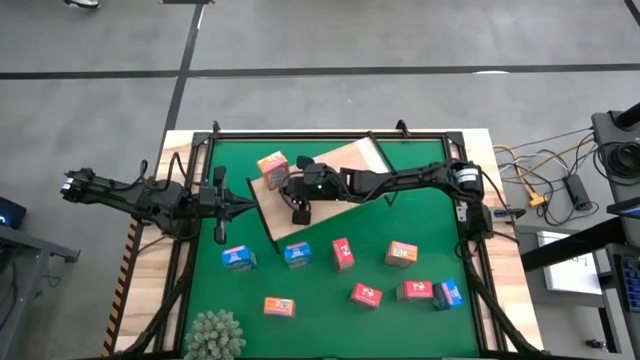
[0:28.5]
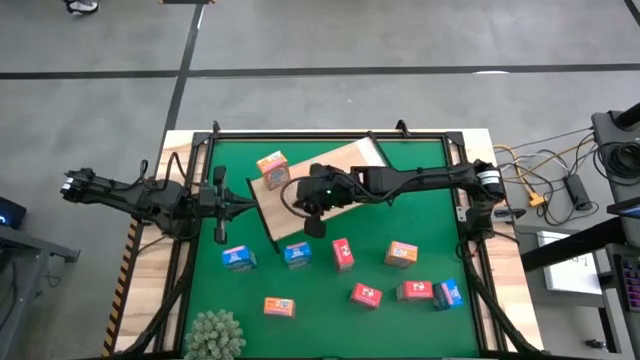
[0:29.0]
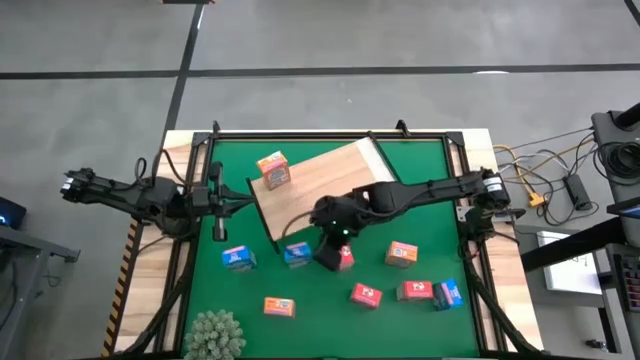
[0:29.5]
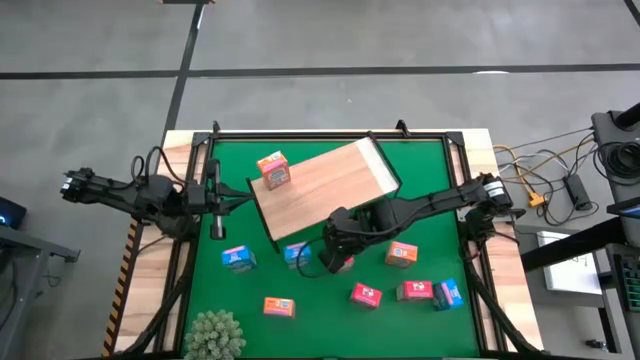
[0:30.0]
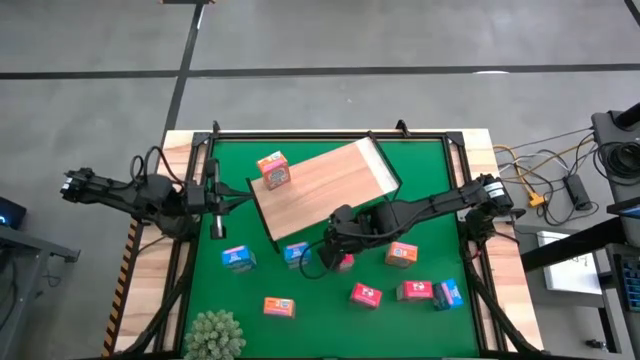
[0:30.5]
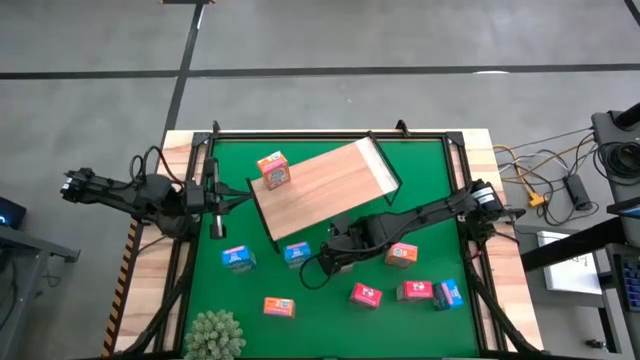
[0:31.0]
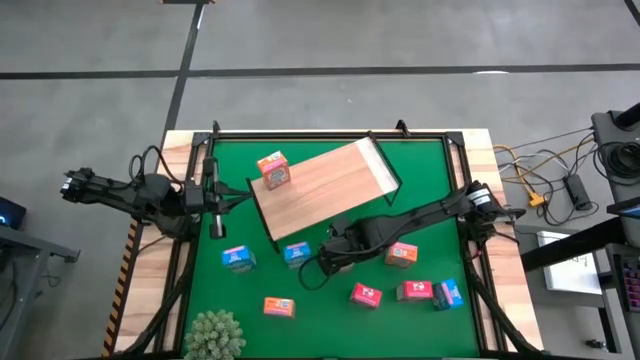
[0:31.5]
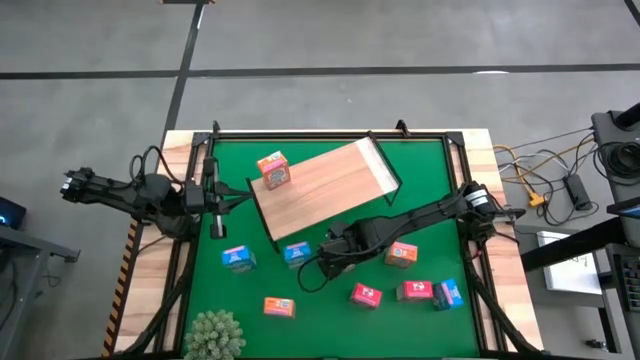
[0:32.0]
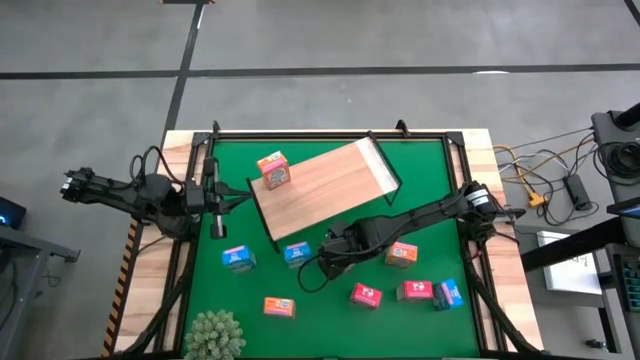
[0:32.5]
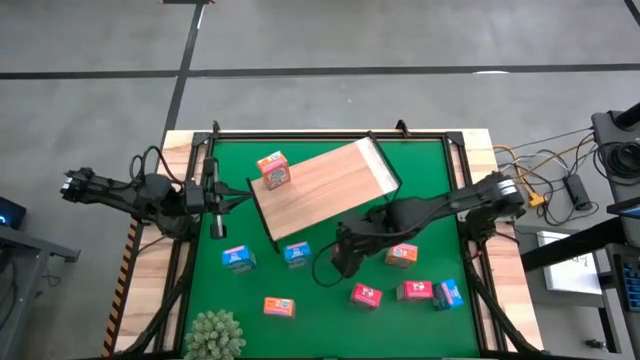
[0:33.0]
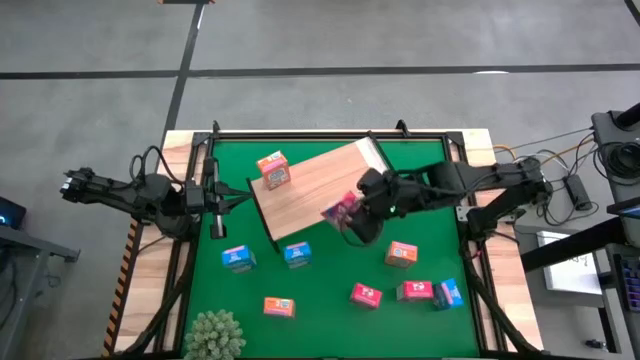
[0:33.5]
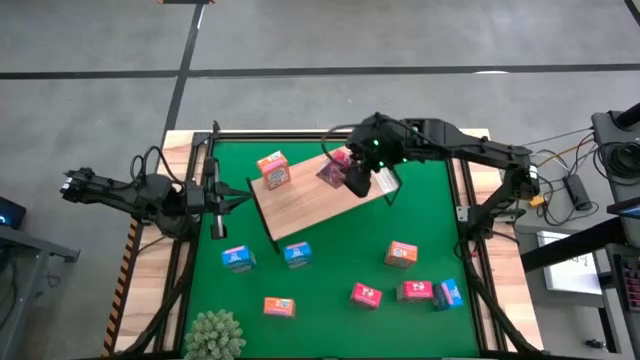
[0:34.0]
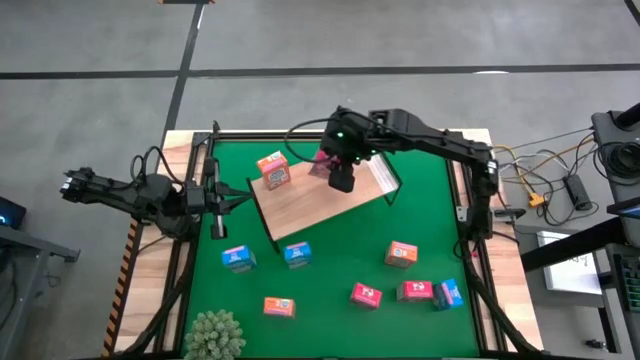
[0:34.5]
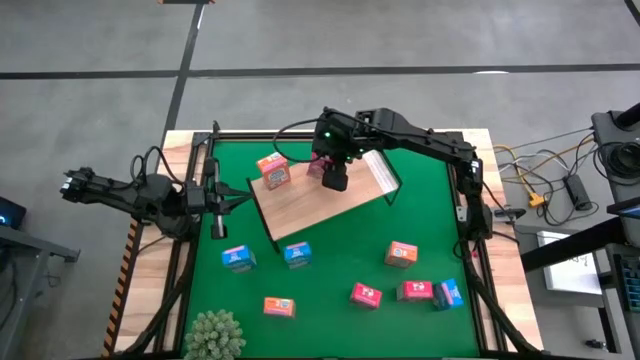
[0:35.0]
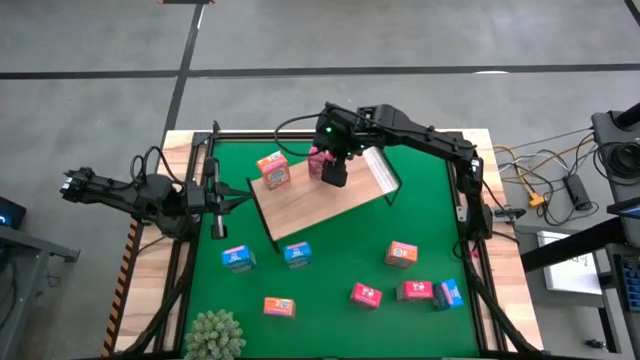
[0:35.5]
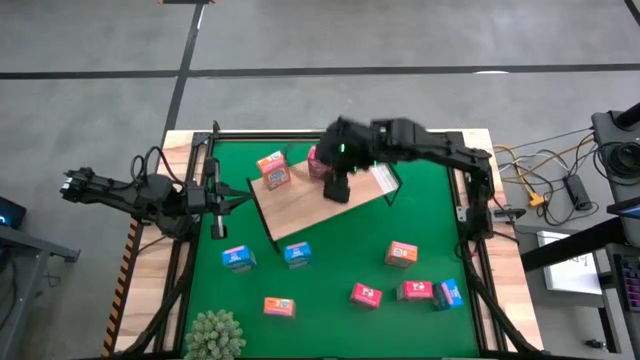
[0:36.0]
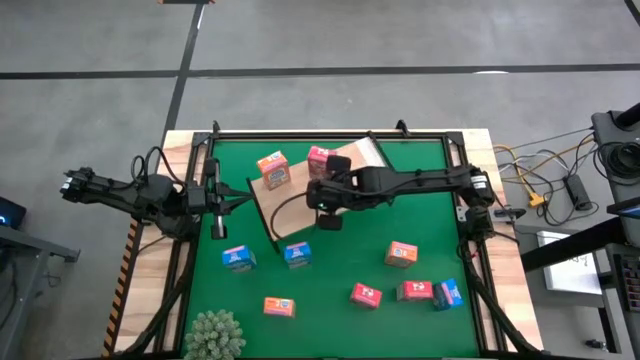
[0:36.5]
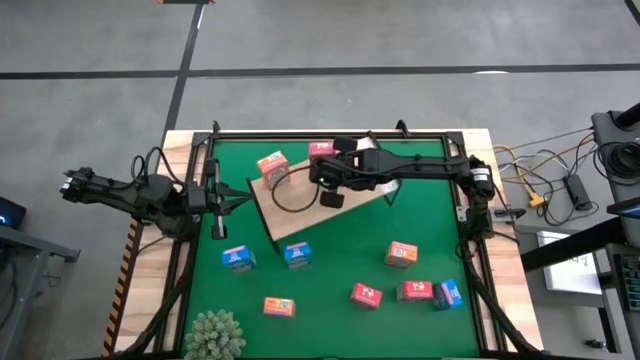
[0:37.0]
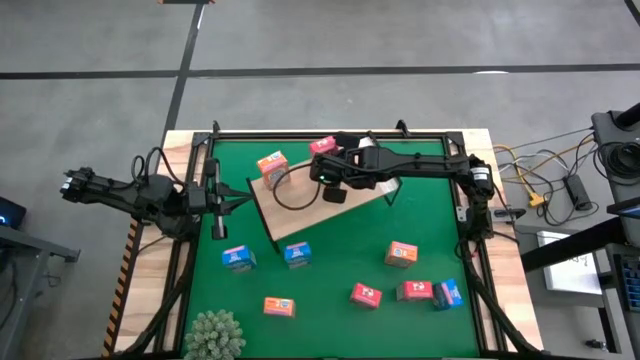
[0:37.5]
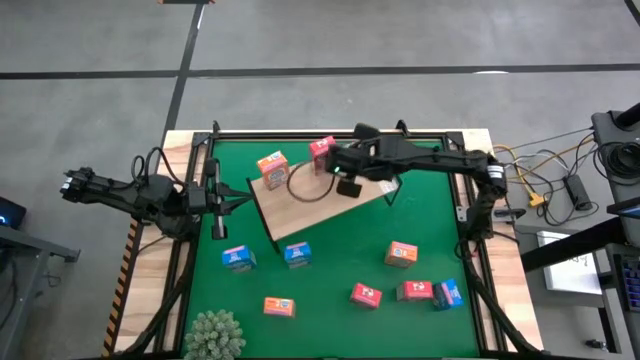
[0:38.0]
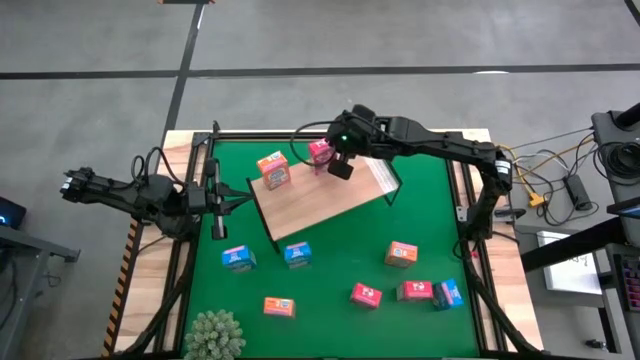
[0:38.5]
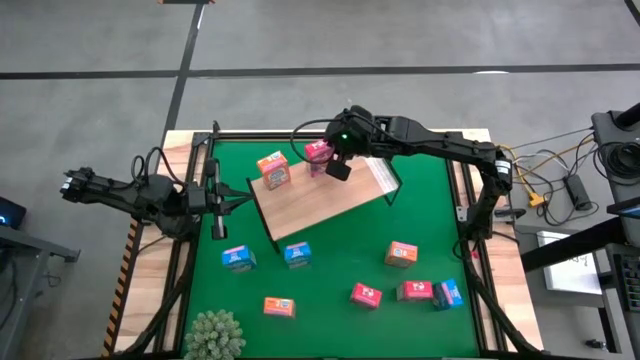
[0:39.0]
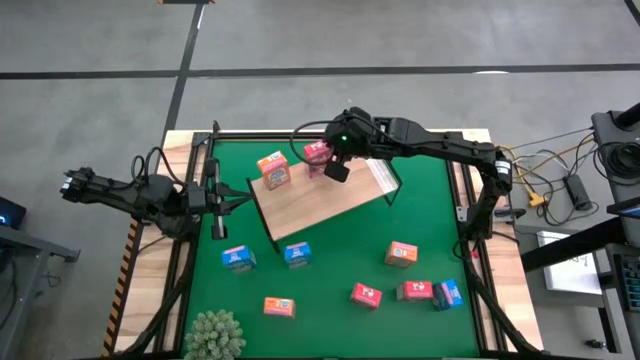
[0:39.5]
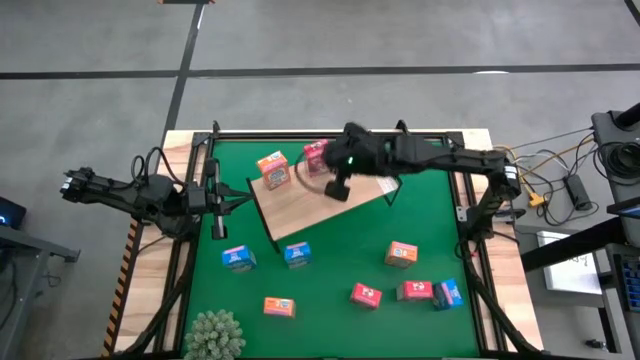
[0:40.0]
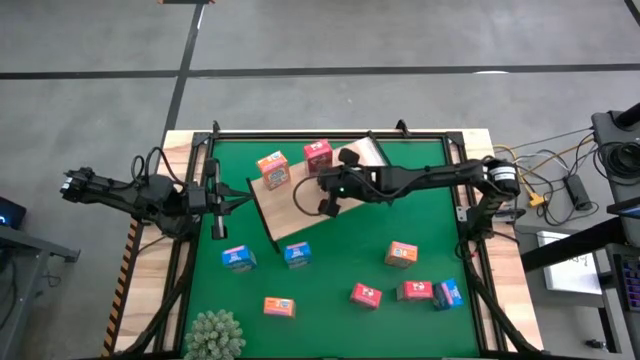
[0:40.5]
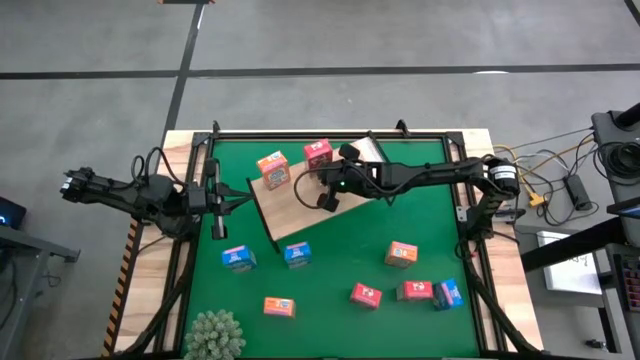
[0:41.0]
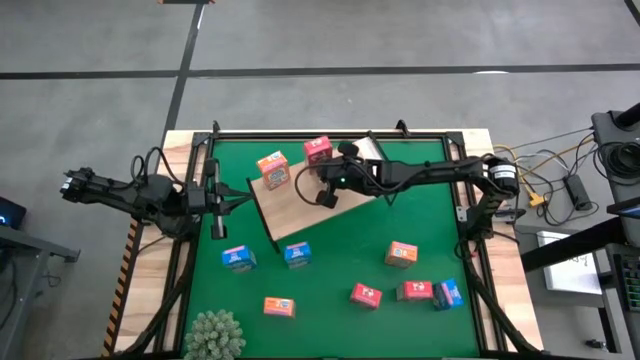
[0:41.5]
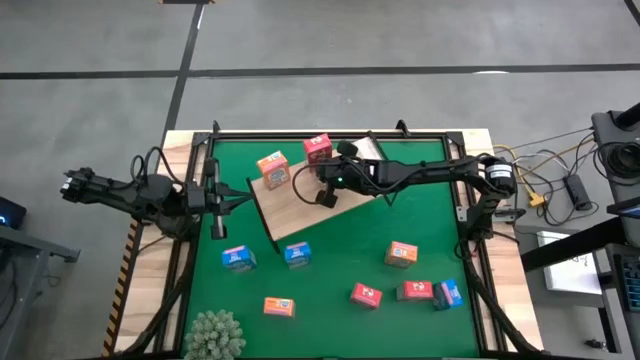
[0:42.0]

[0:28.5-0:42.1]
Task: Stack cereal on shelf
Put the top left red cereal box on the shelf

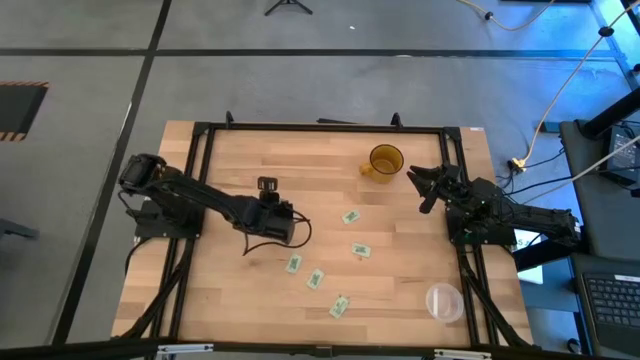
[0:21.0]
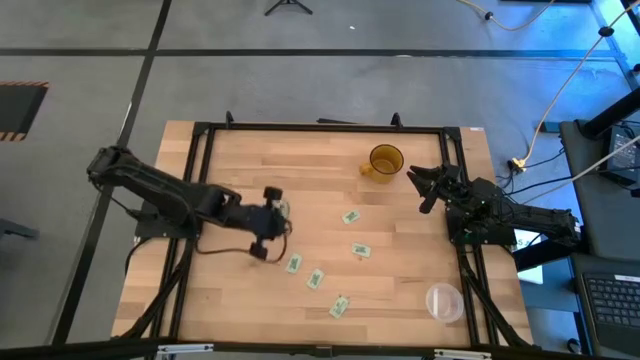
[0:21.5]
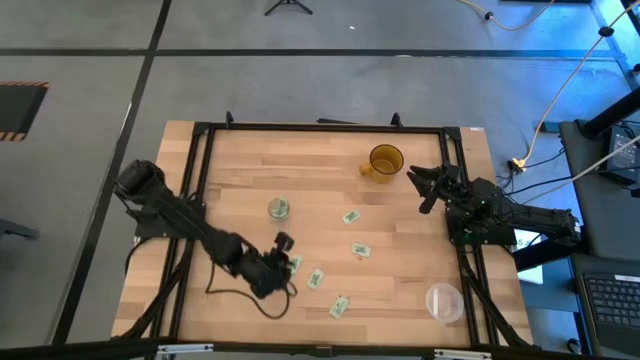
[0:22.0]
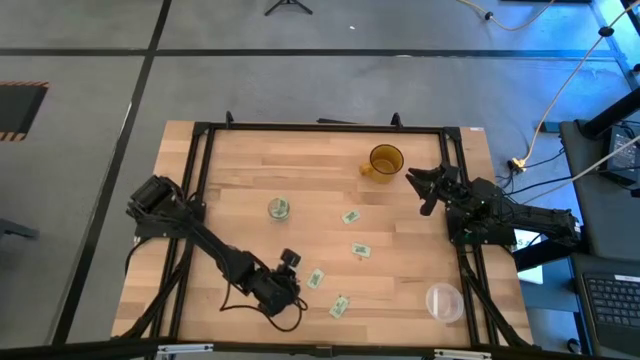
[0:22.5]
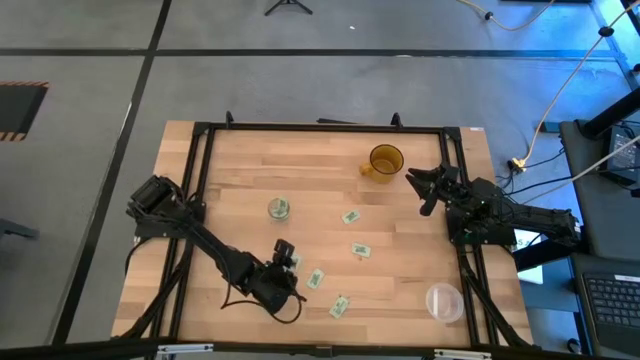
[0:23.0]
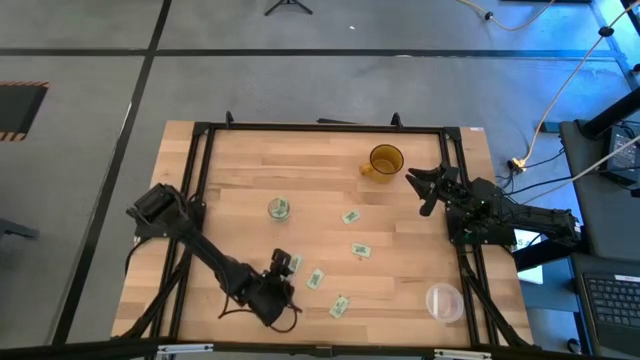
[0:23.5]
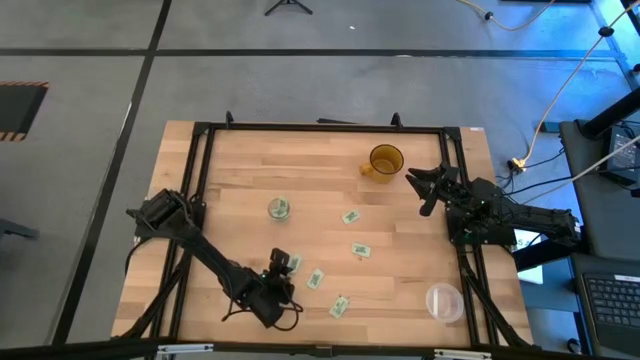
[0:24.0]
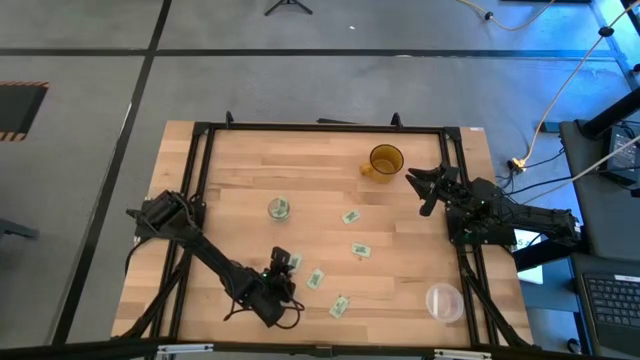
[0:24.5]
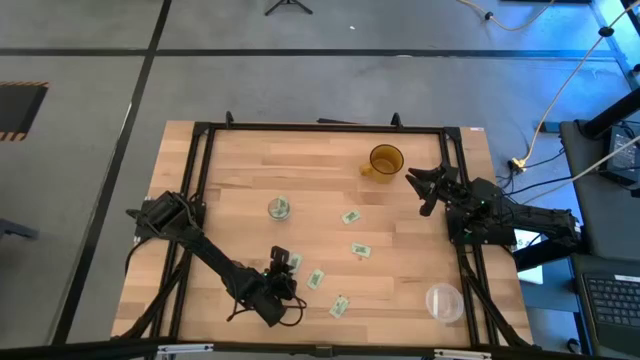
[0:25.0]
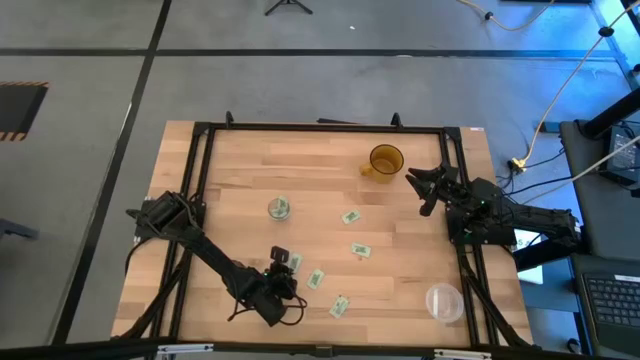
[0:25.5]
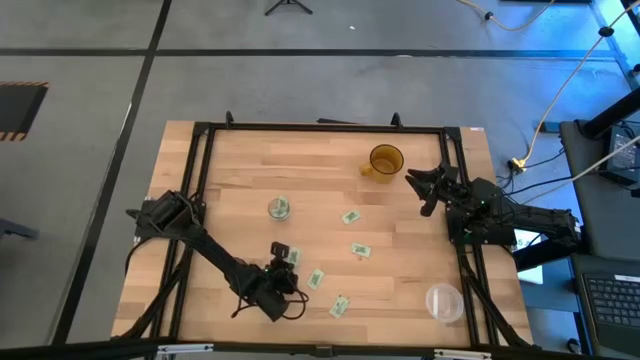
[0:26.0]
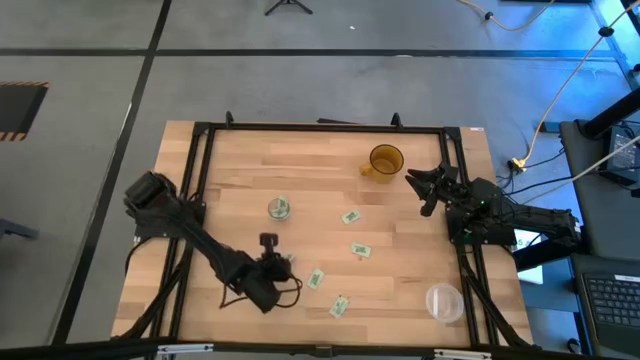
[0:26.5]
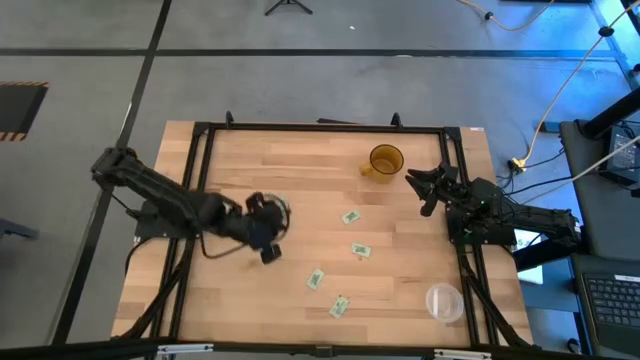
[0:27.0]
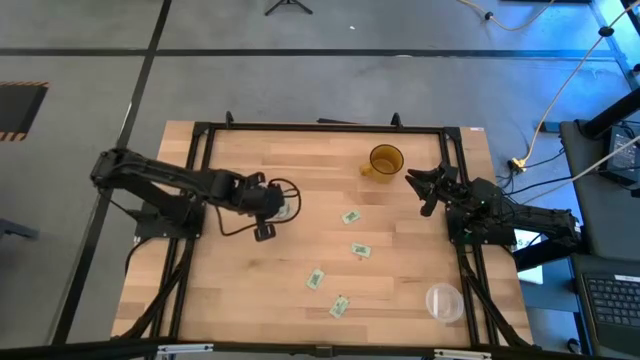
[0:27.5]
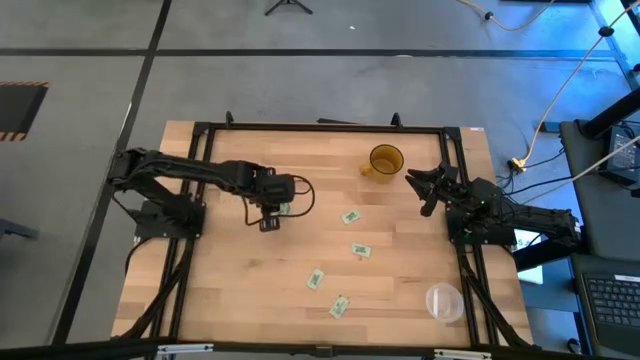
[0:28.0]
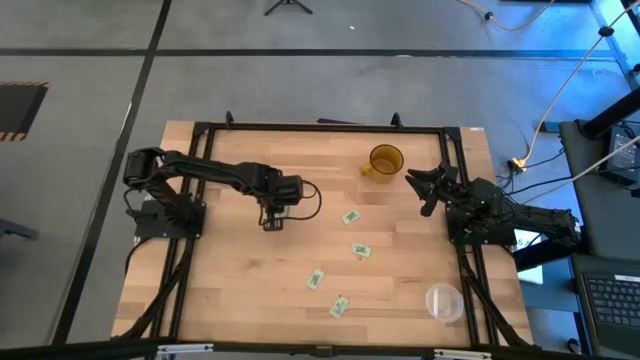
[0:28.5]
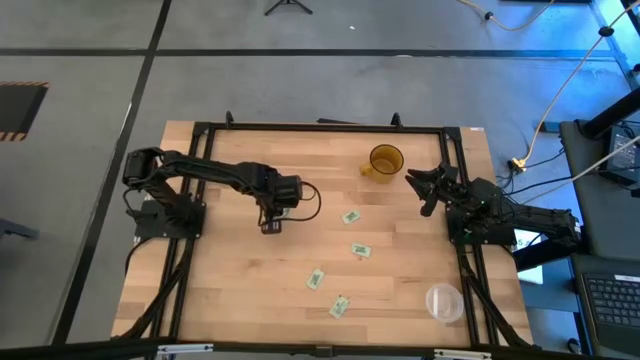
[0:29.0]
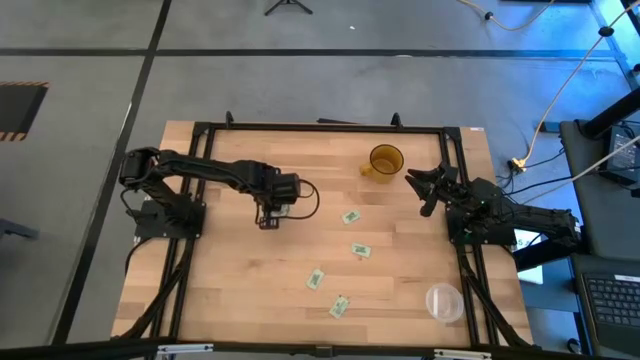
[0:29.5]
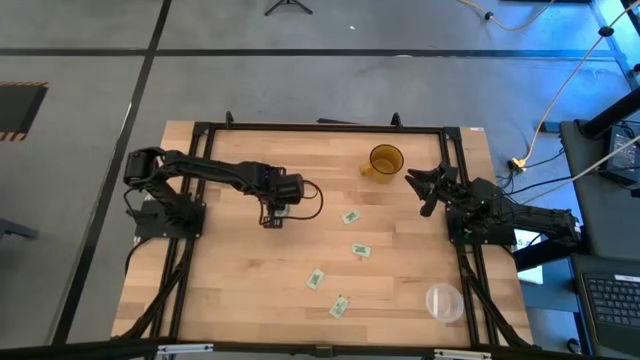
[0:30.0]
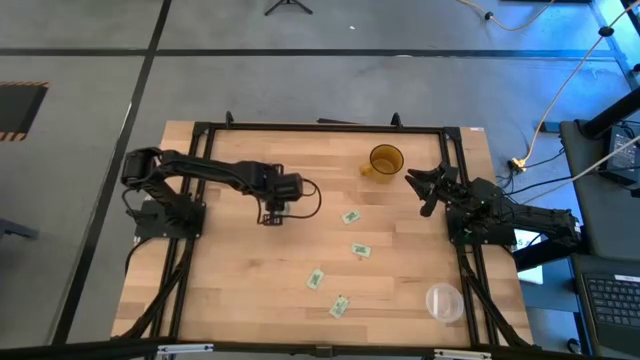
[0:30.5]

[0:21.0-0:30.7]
Task: Pick and place Stevia / Truvia into bins
Put the stevia packet into the transparent container
